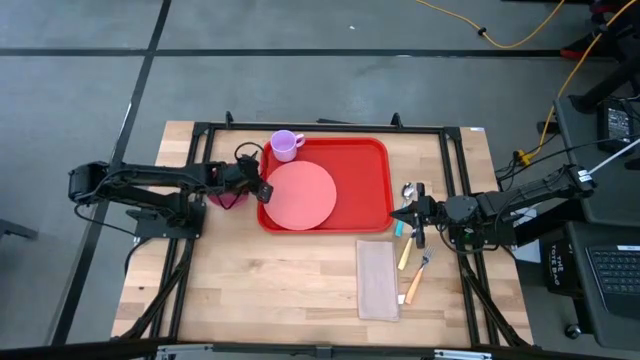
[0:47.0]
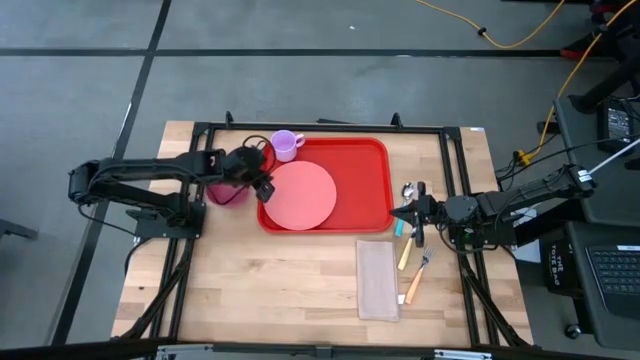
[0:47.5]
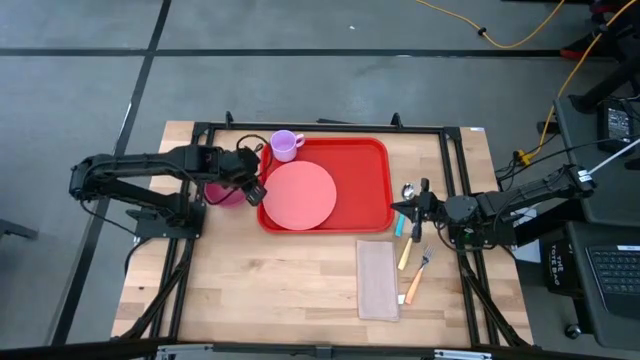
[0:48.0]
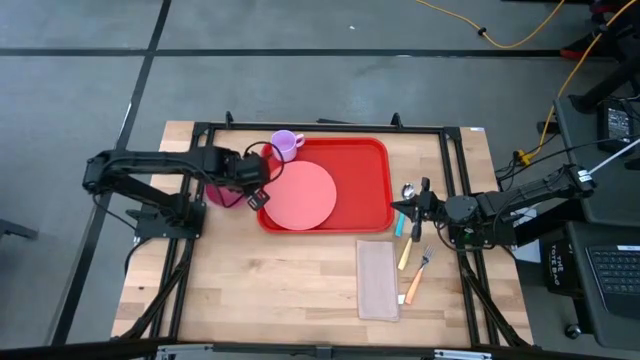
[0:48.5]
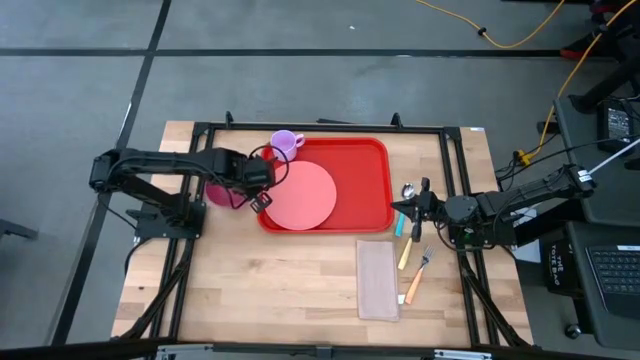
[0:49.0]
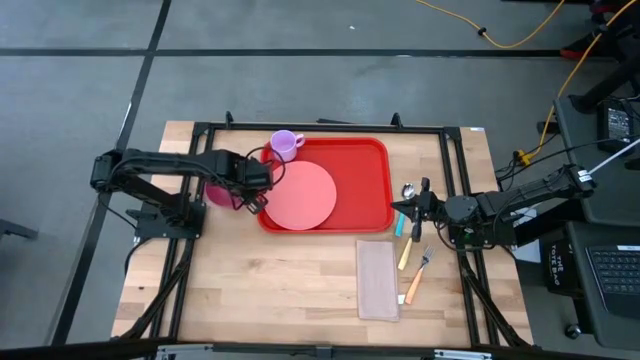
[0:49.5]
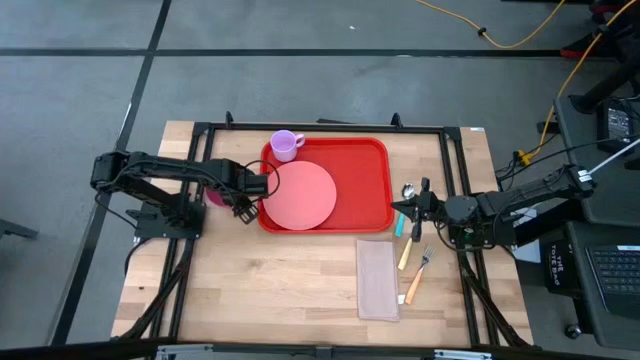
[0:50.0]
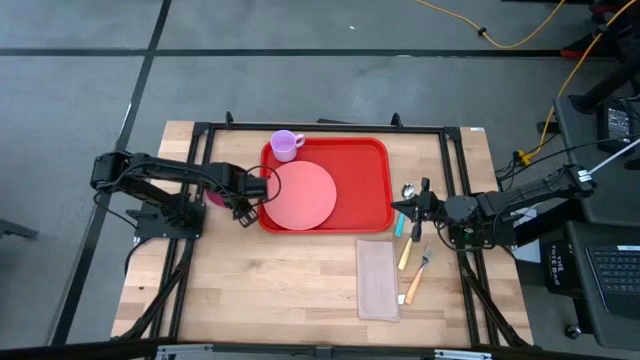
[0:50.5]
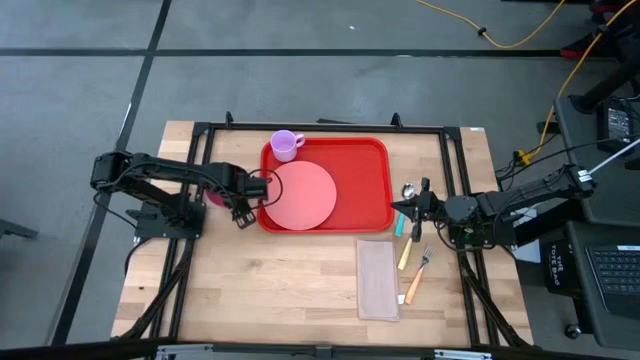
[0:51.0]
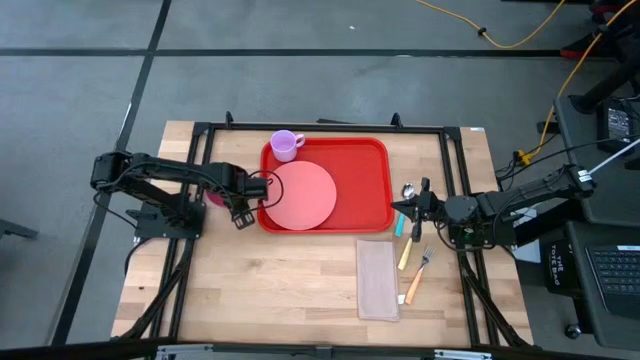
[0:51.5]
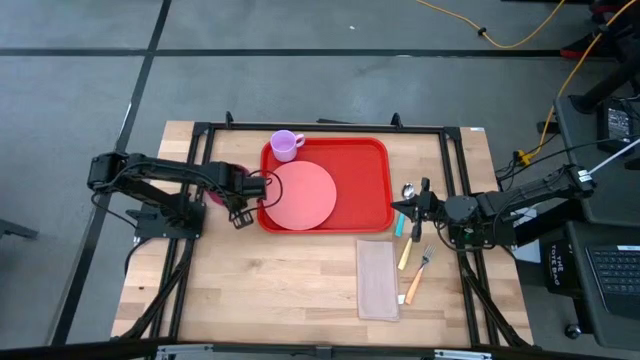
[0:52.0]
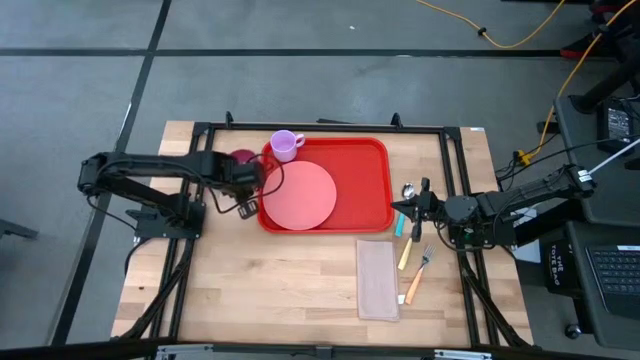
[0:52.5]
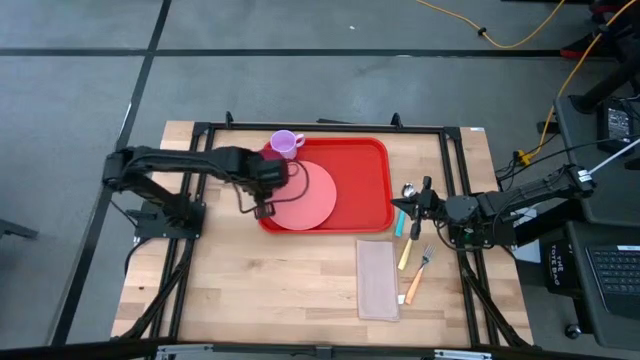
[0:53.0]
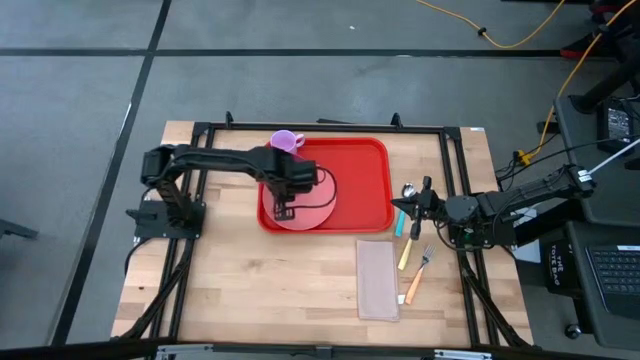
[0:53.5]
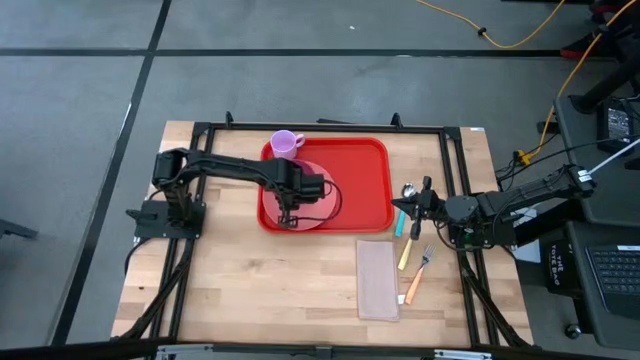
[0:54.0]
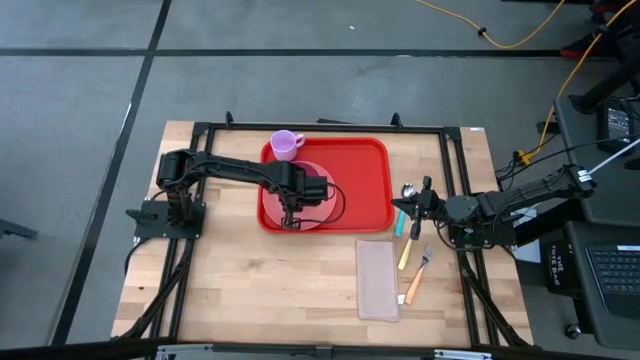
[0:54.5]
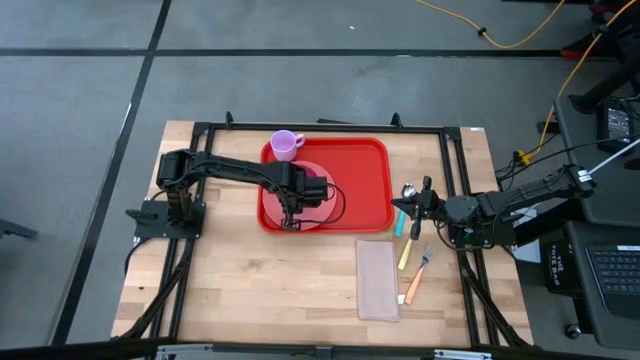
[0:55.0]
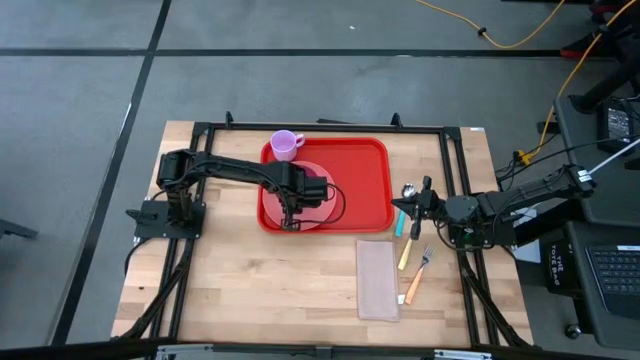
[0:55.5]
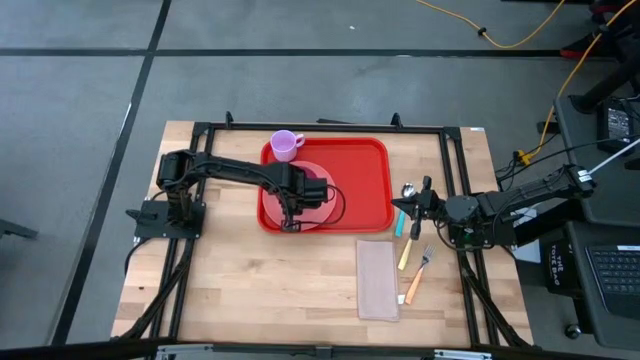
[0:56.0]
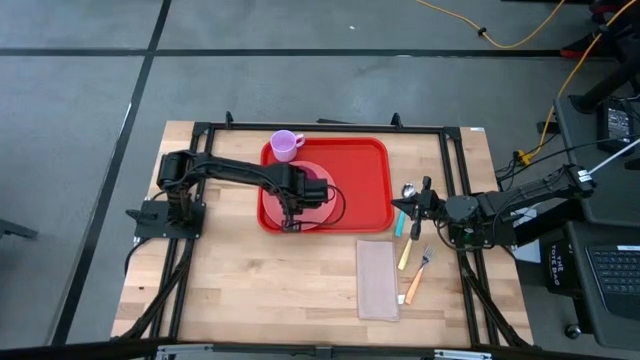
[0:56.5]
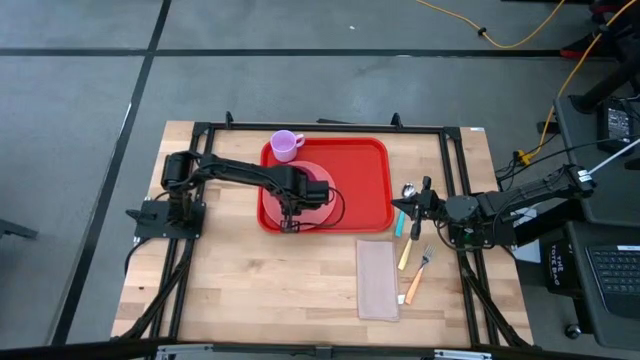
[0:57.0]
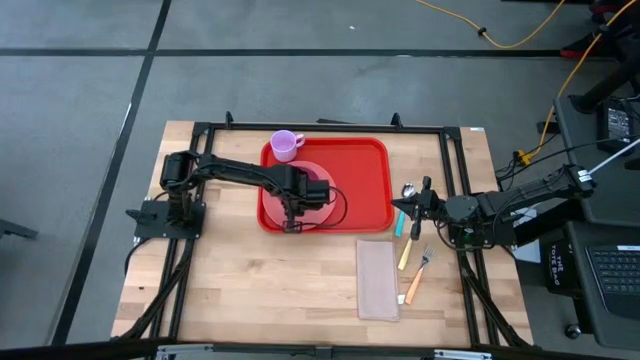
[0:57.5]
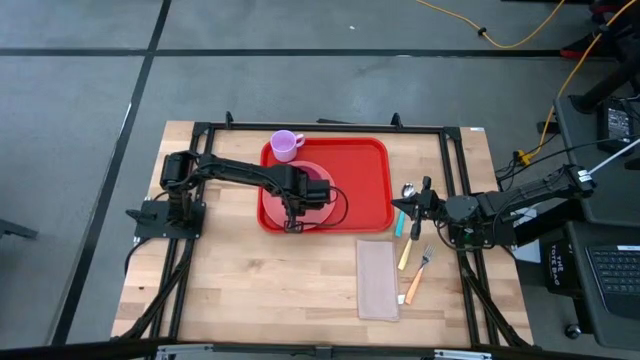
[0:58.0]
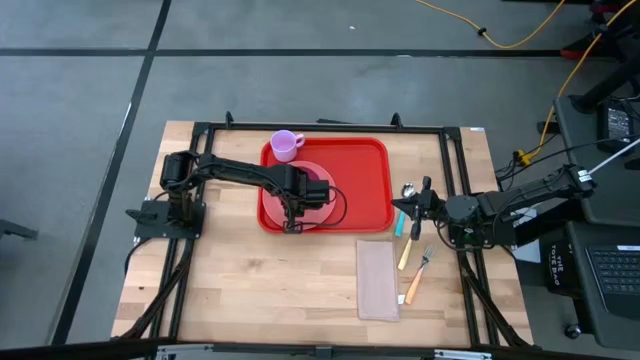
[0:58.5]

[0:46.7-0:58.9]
Task: Set up tray
Put the pink bowl on the pink plate on the red tray

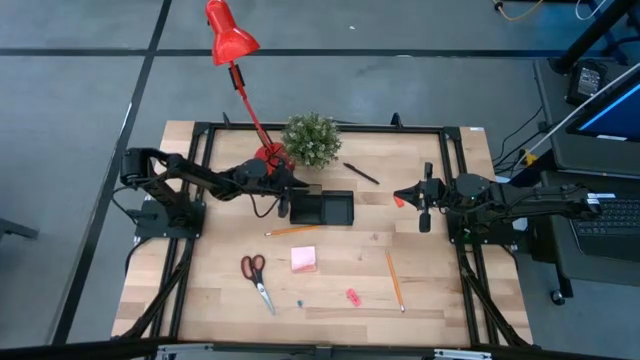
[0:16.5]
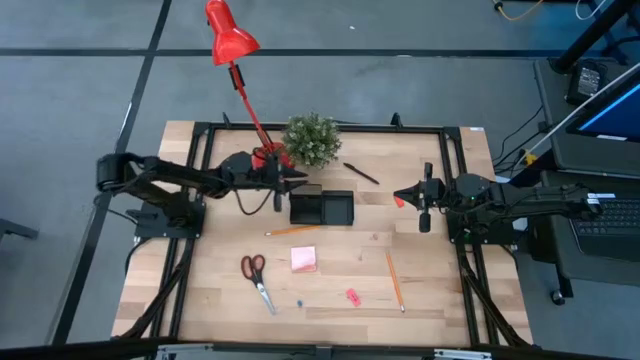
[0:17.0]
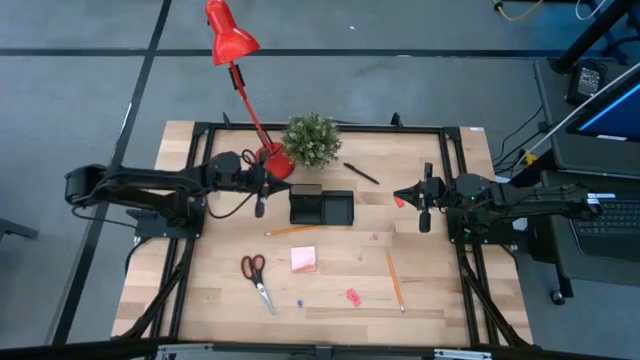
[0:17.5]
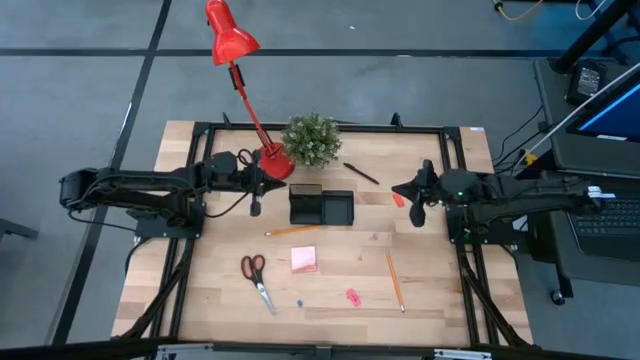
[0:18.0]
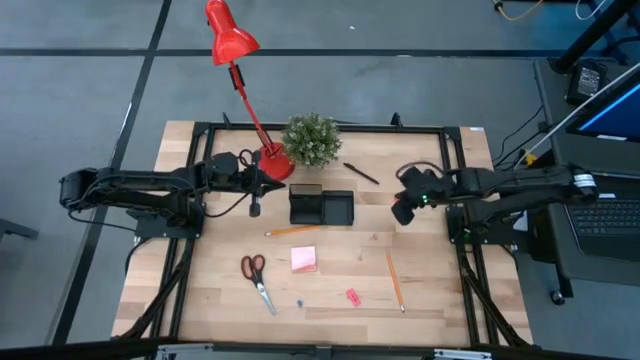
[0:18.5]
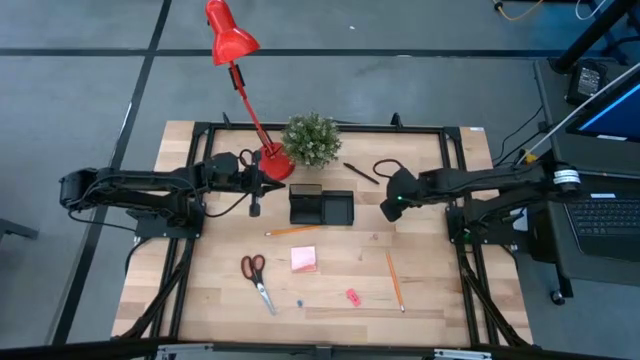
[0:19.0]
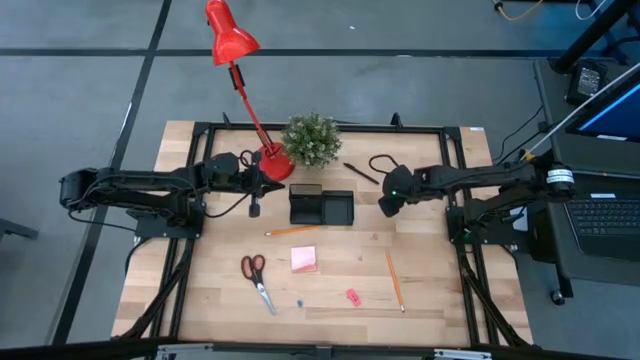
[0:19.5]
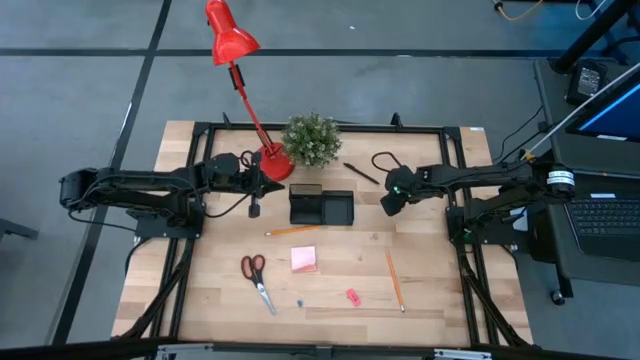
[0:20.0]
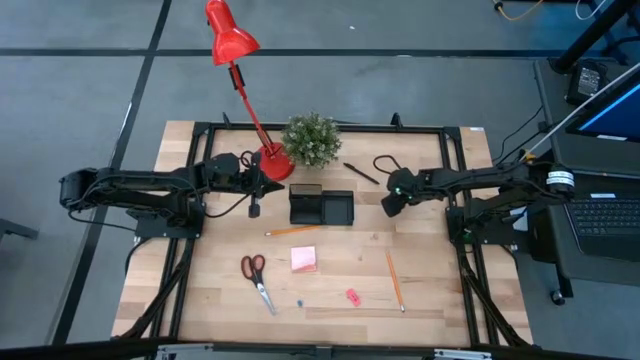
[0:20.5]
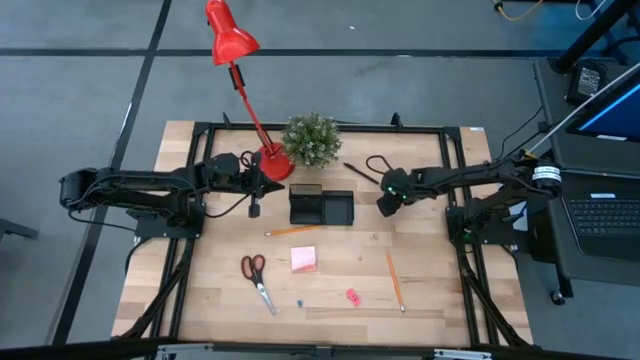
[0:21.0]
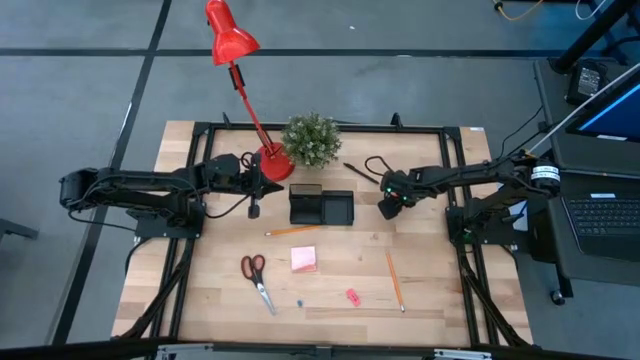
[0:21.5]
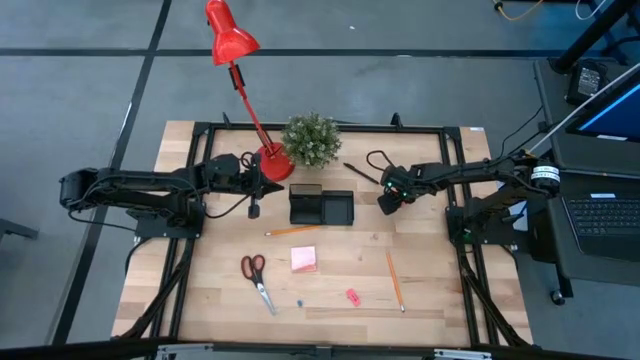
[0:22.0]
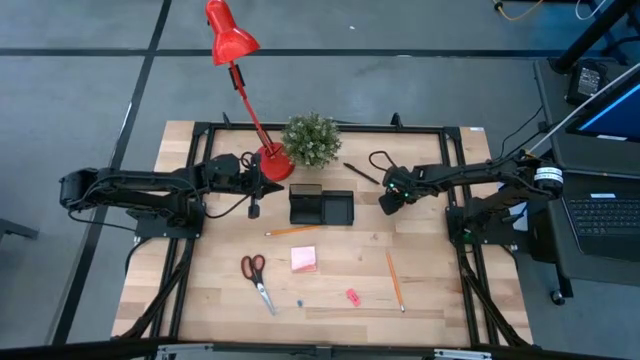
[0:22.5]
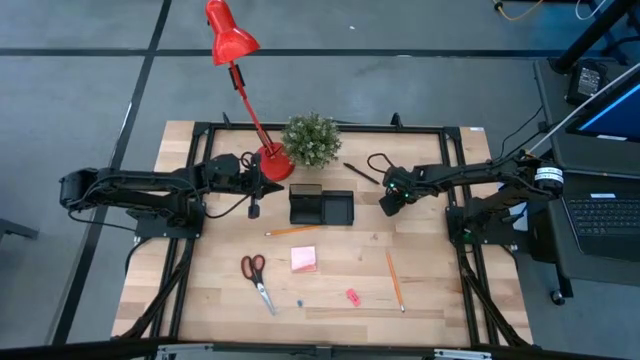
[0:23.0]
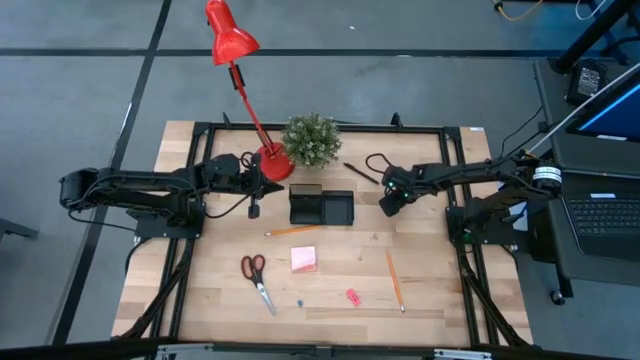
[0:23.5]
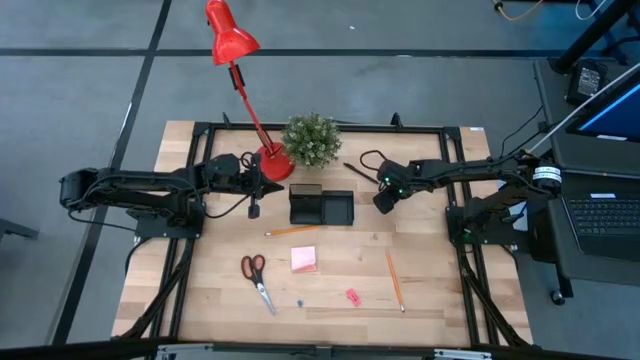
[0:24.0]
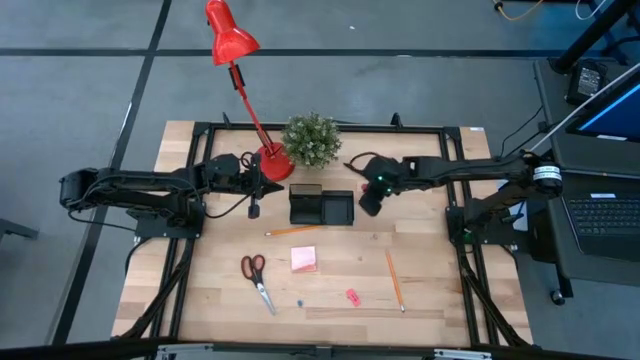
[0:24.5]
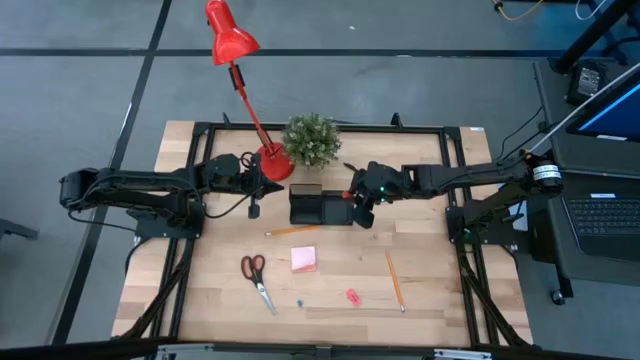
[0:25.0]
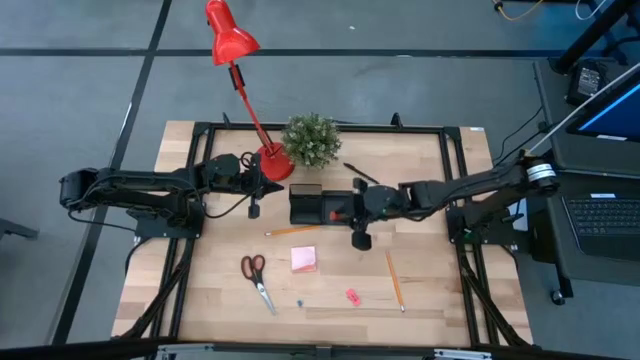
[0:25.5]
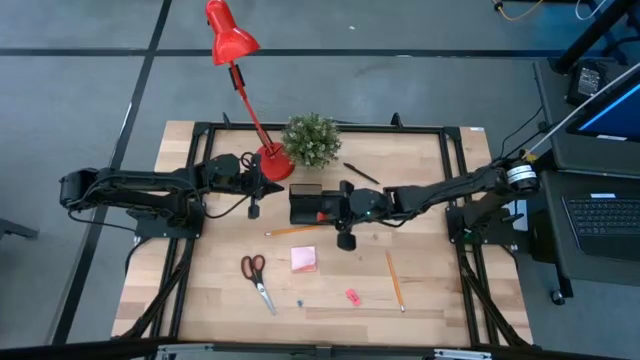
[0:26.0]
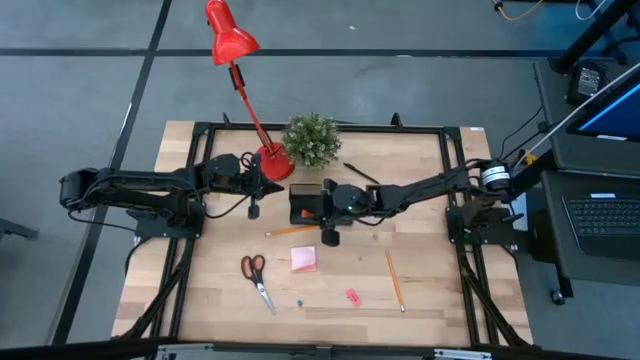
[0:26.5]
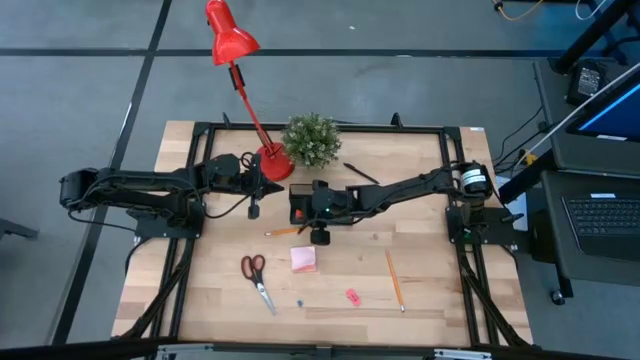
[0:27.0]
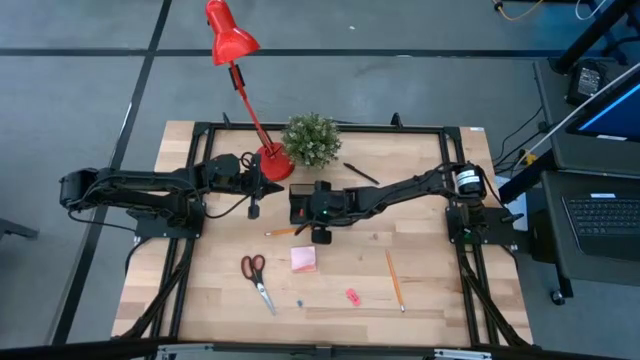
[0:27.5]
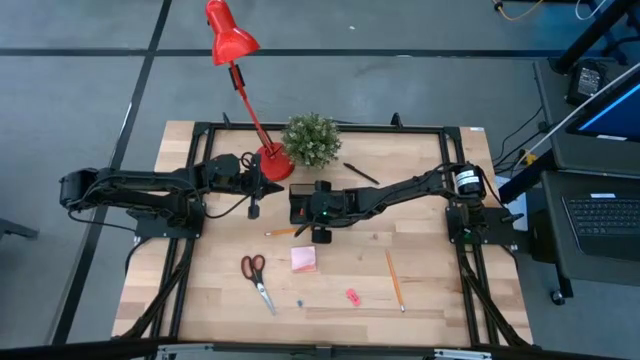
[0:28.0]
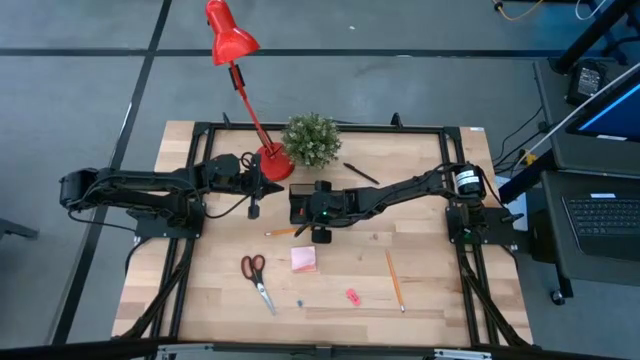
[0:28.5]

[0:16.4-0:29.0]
Task: Pick and place office supplies into organizer
Put the orange eraser into the black desk organizer
